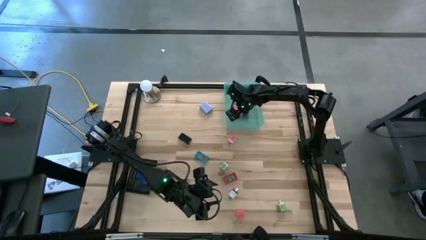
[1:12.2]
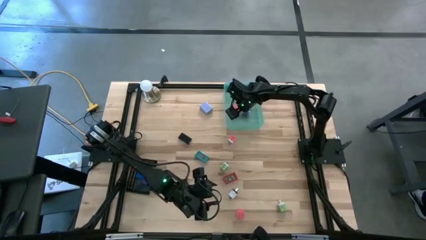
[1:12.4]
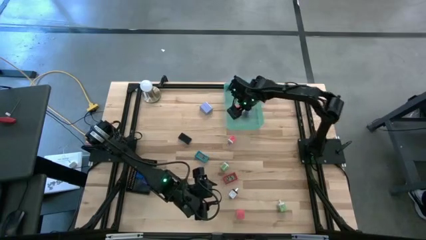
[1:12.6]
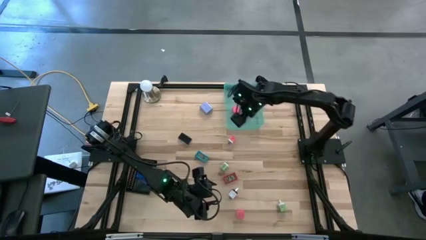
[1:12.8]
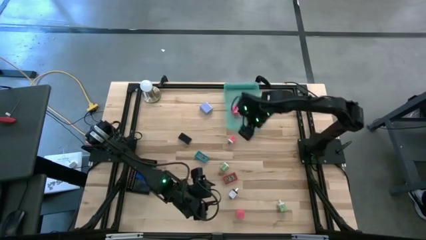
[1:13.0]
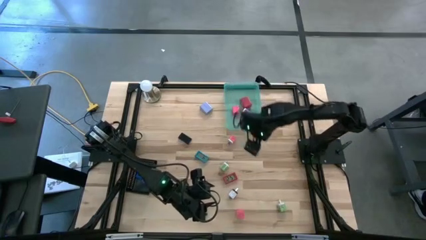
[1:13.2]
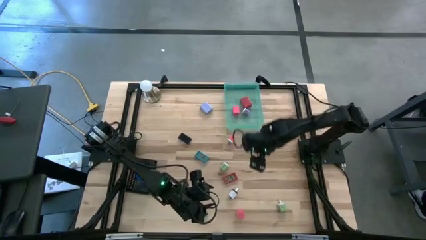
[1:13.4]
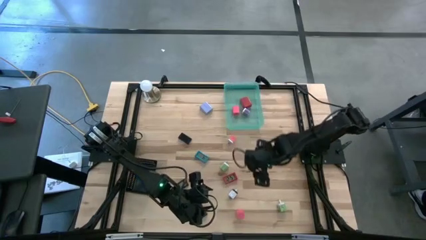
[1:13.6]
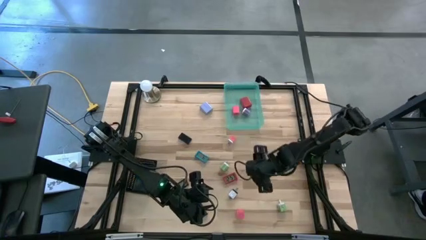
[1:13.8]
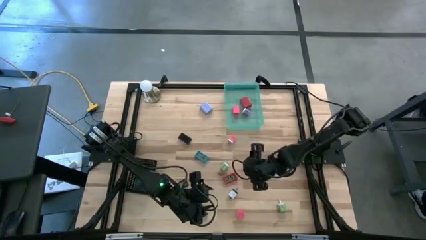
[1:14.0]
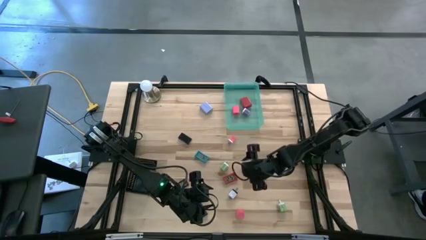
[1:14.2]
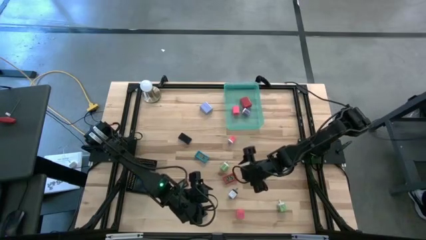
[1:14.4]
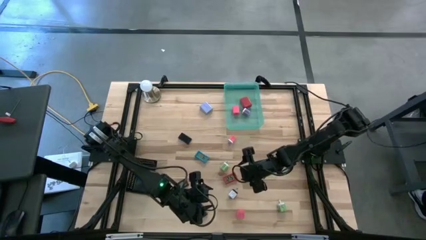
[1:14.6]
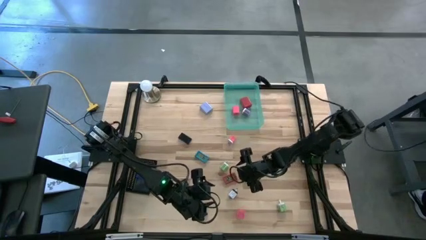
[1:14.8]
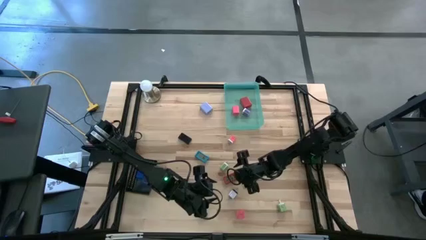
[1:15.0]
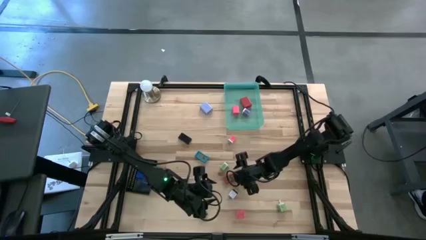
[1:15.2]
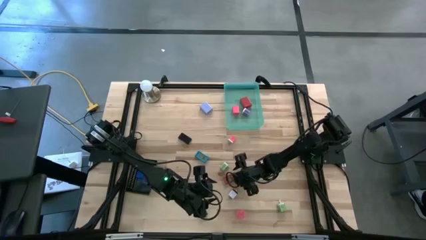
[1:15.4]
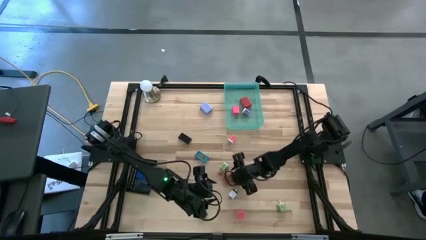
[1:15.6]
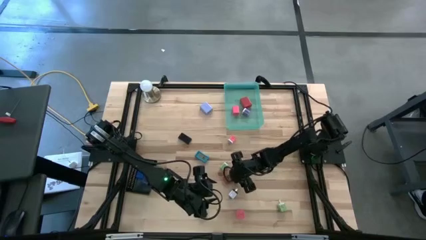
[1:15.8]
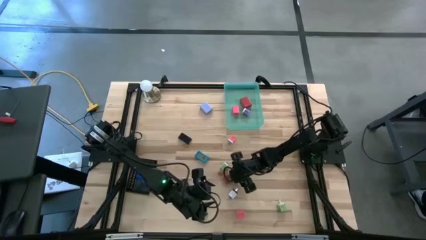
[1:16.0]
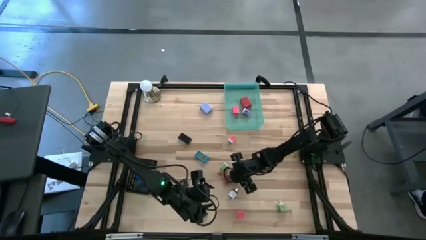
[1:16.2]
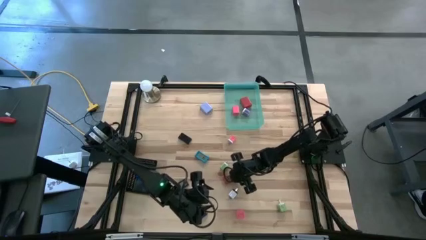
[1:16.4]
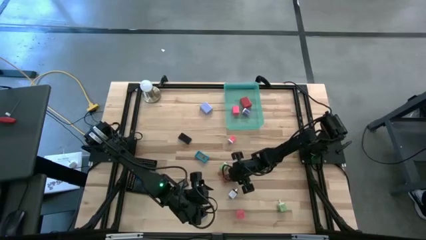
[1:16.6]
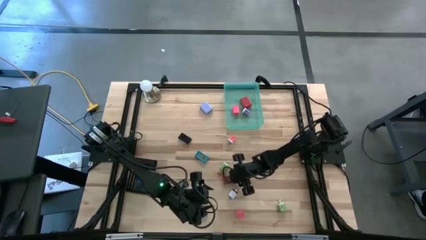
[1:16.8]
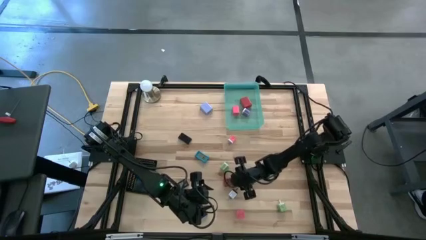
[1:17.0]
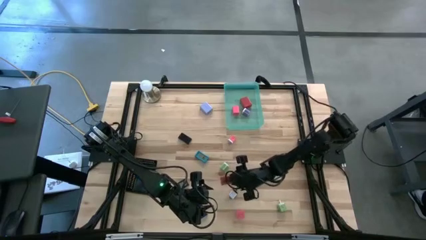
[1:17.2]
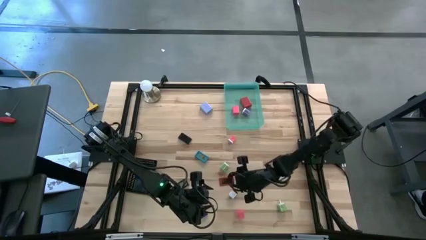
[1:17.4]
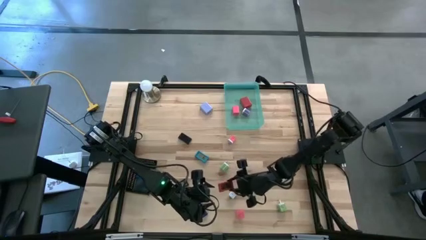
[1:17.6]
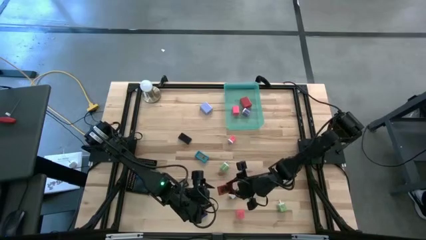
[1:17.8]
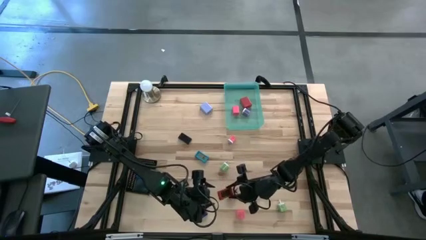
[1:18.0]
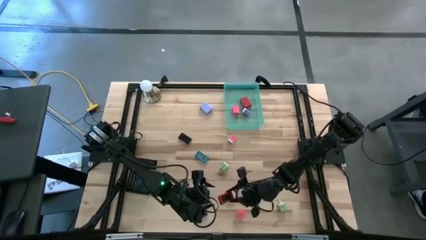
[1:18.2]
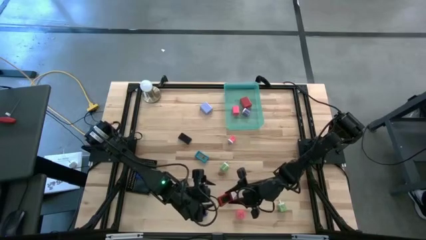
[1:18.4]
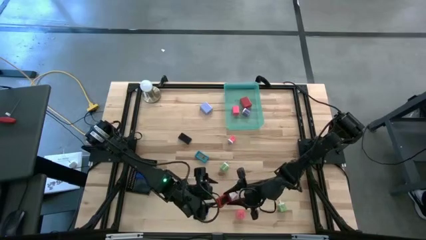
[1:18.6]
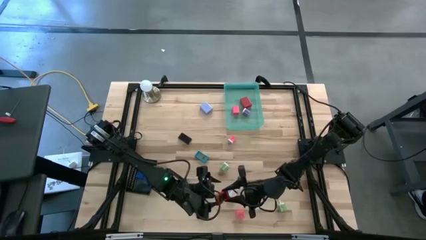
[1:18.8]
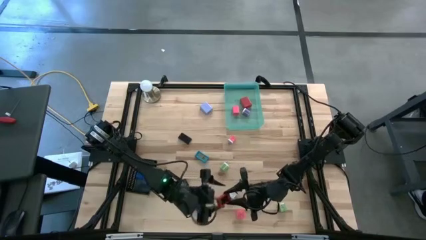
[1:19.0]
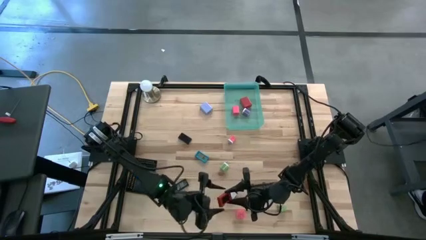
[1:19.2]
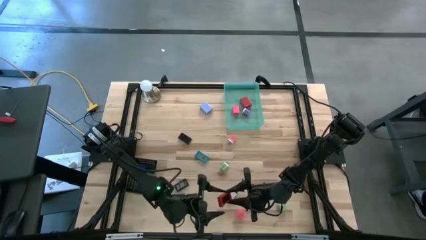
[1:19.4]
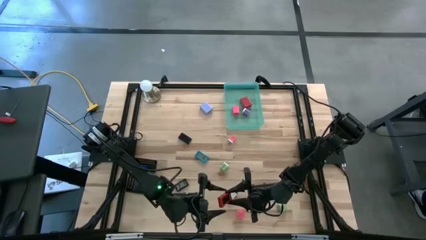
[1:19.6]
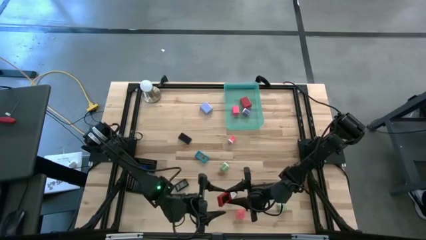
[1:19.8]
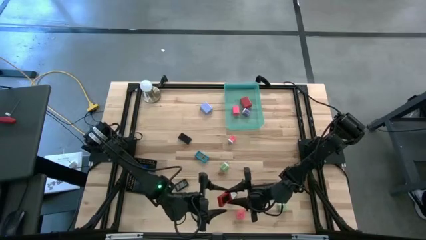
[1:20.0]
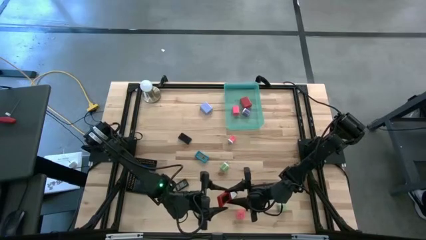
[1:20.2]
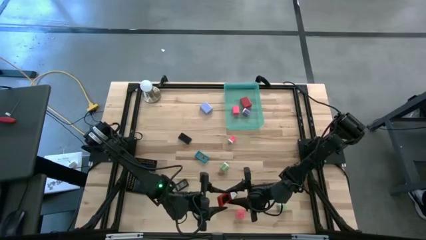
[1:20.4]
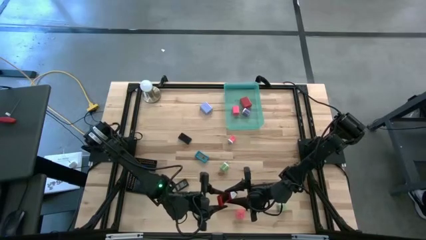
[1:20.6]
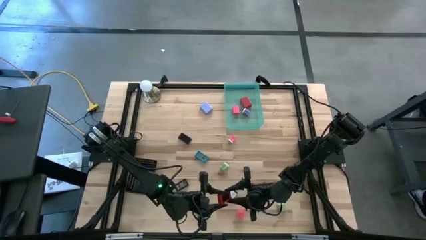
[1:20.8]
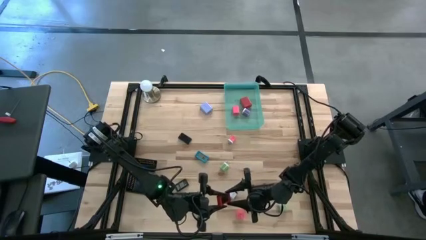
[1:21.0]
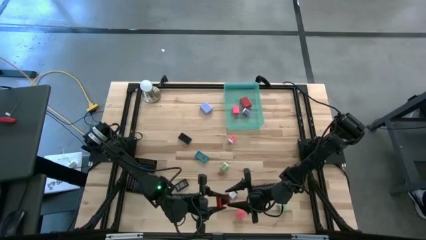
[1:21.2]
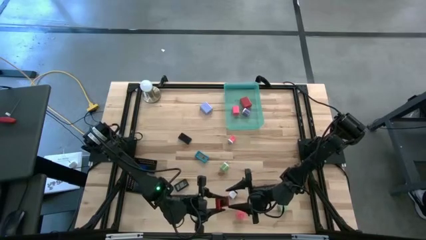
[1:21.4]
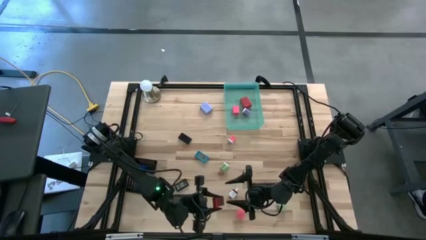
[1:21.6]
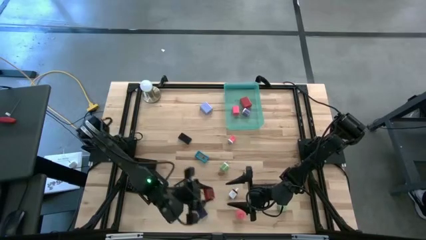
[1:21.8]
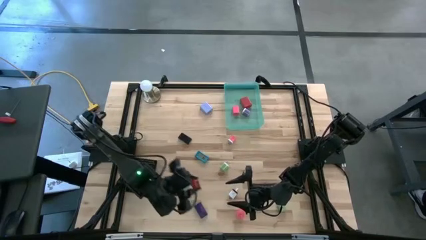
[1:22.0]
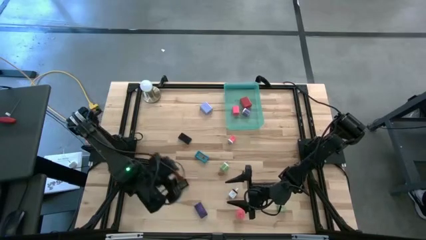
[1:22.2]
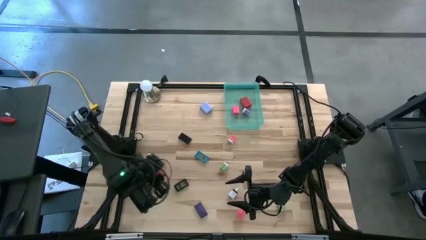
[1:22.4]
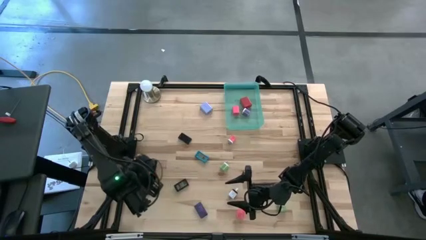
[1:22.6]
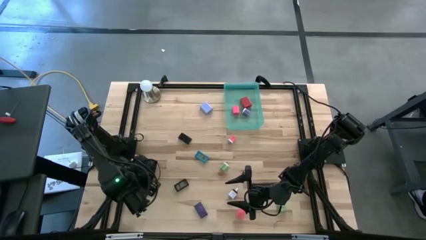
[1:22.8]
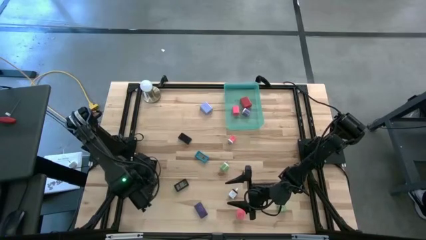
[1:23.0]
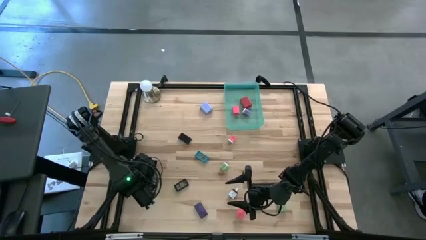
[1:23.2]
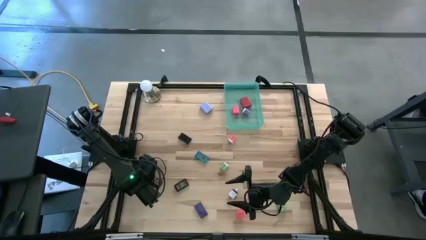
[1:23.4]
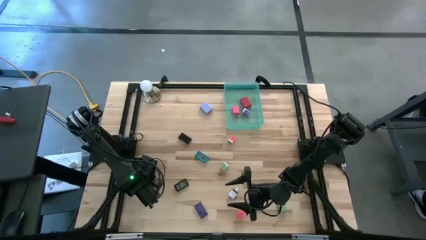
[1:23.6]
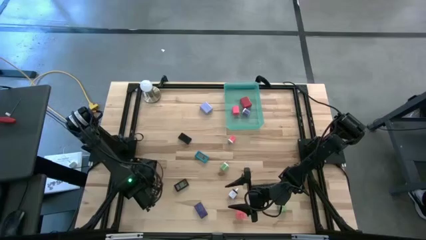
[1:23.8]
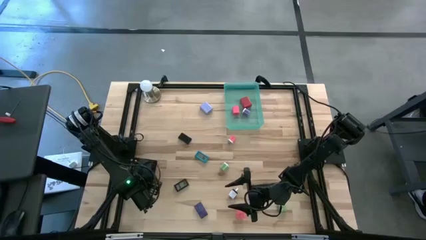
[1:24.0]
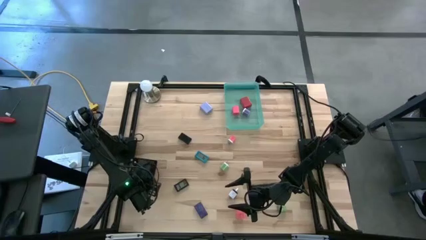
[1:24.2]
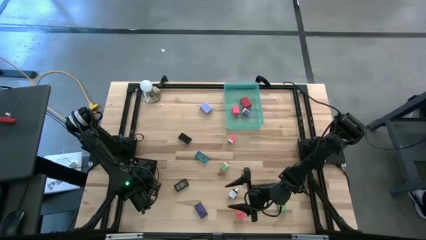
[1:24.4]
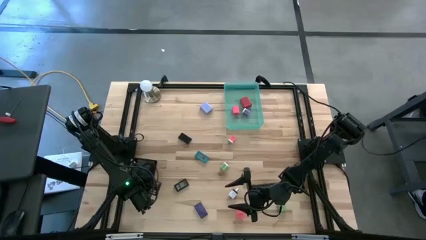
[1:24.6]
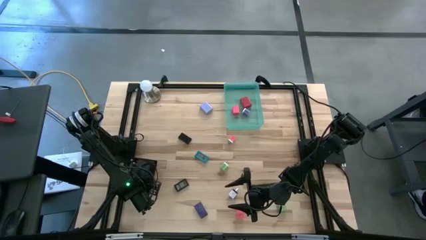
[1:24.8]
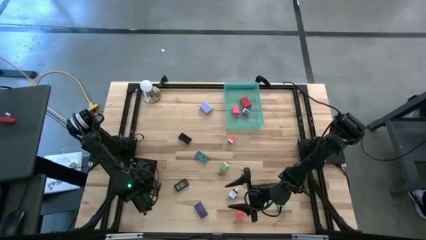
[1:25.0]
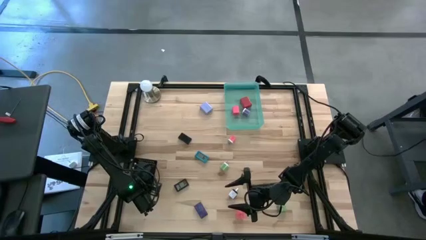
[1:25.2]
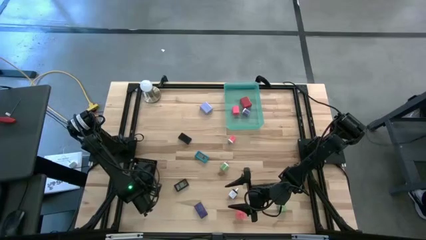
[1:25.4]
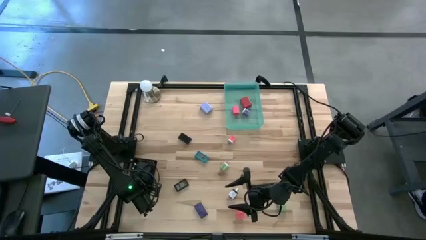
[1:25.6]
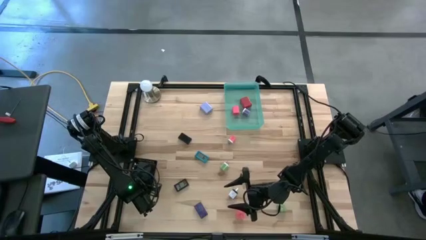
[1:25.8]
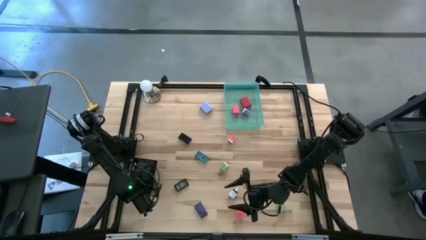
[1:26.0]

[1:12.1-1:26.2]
Task: Pick & Place Office items
Put the red digital timer into the black bin
